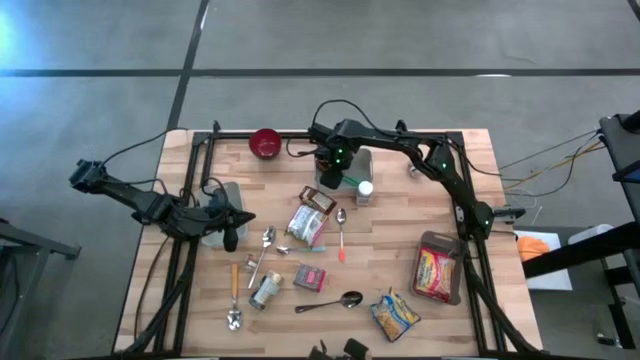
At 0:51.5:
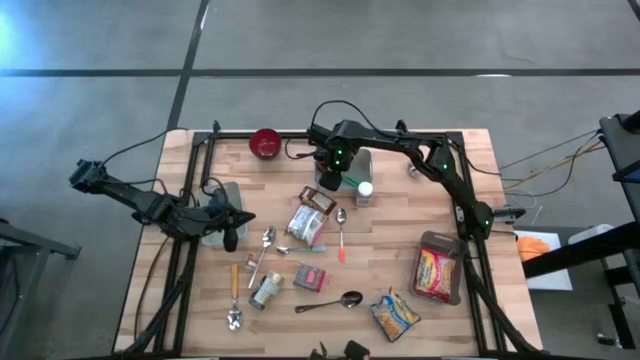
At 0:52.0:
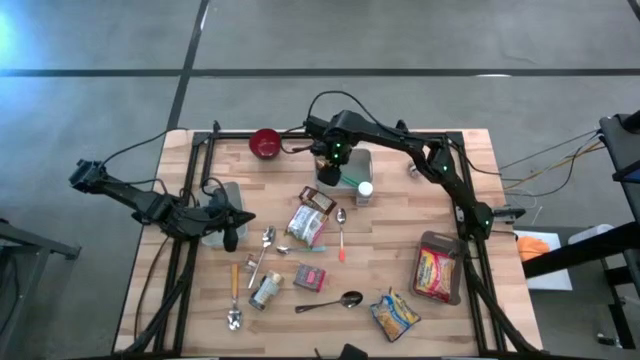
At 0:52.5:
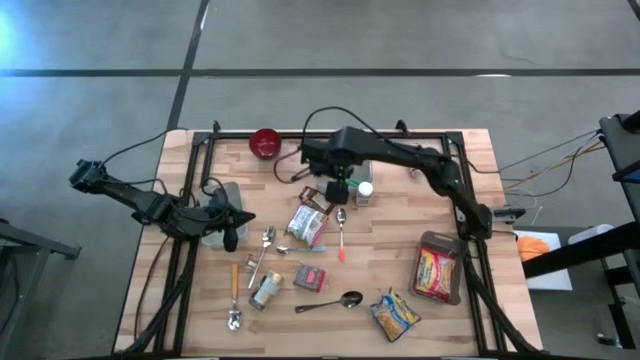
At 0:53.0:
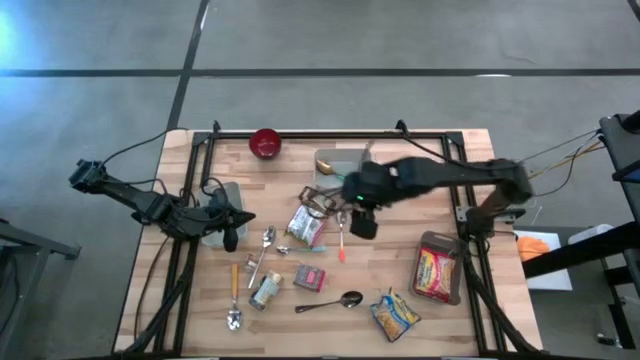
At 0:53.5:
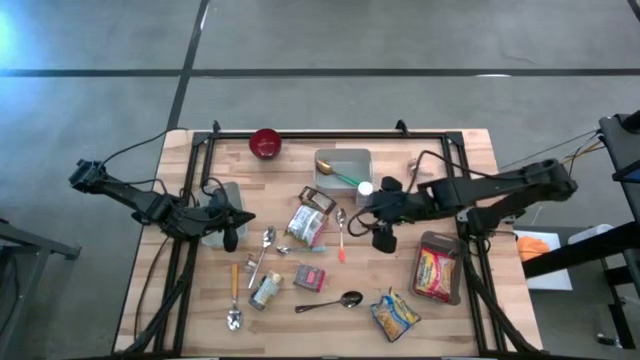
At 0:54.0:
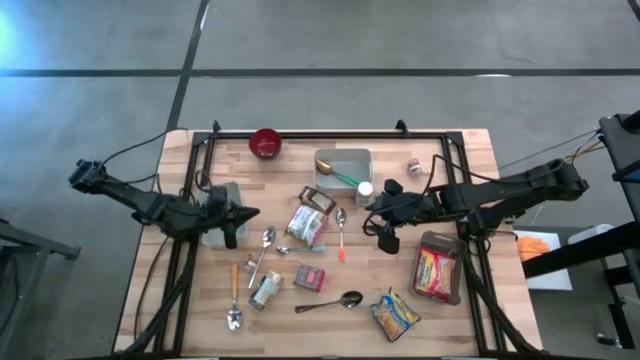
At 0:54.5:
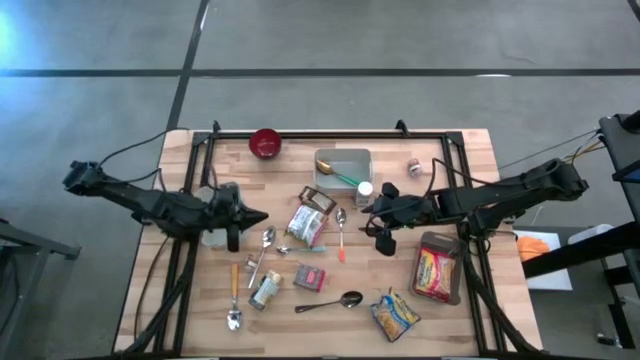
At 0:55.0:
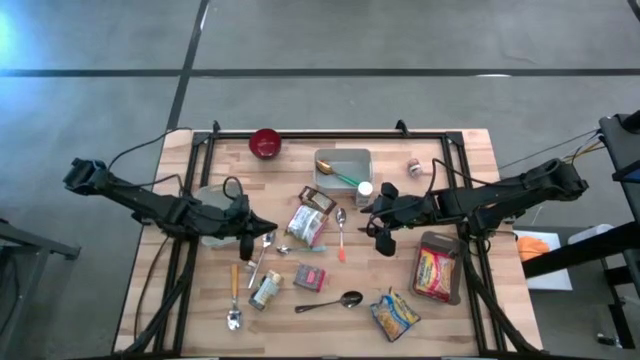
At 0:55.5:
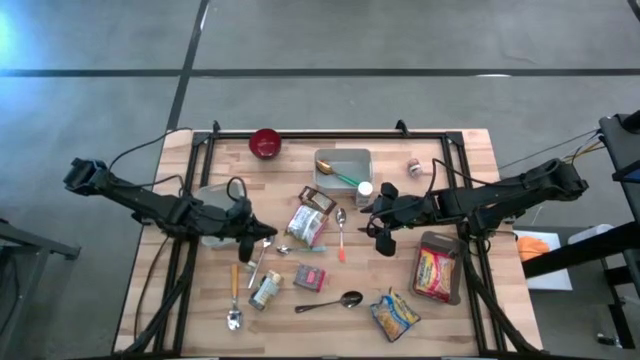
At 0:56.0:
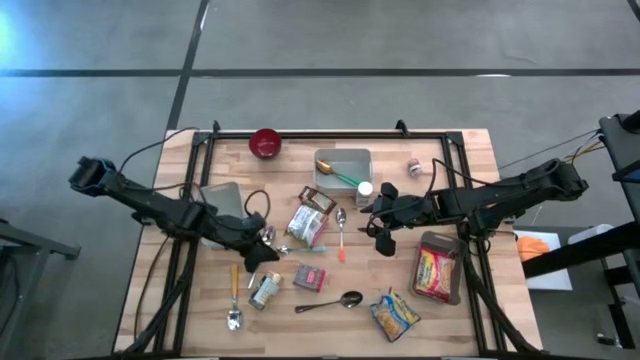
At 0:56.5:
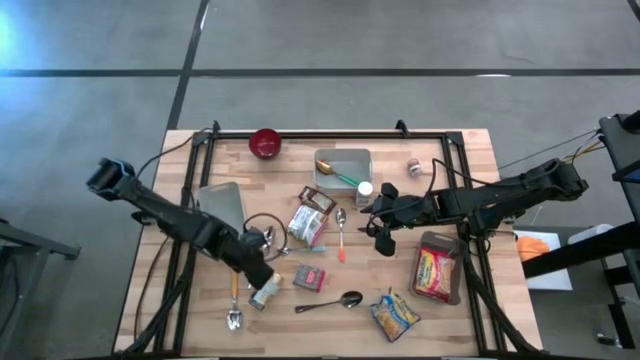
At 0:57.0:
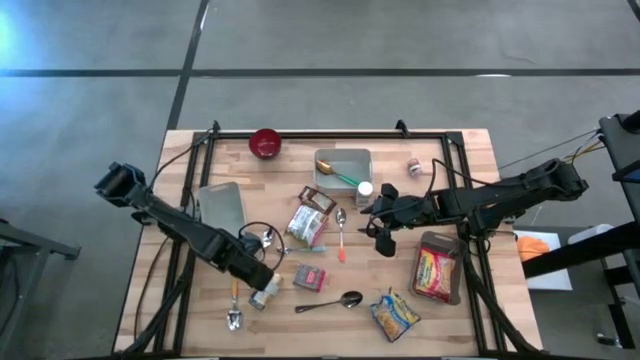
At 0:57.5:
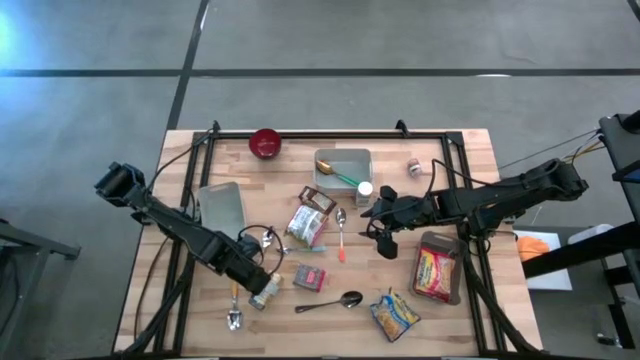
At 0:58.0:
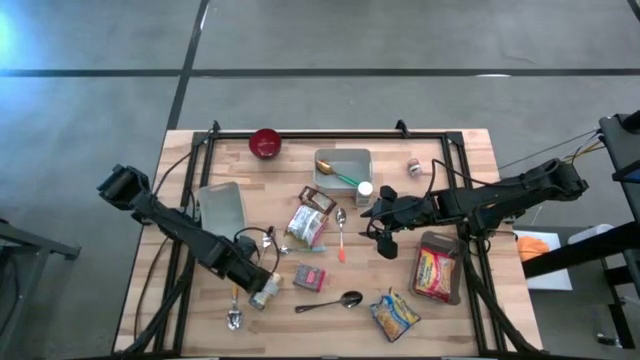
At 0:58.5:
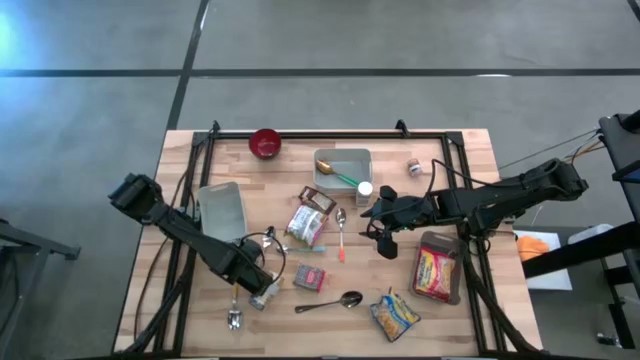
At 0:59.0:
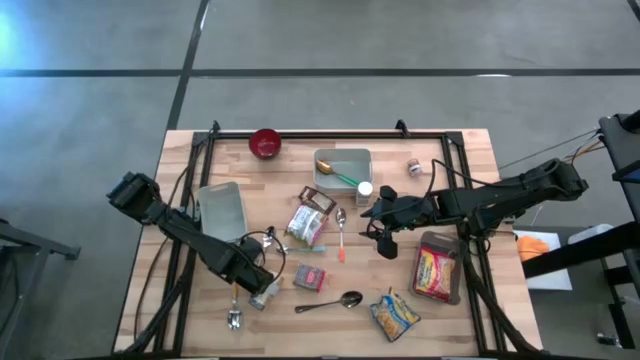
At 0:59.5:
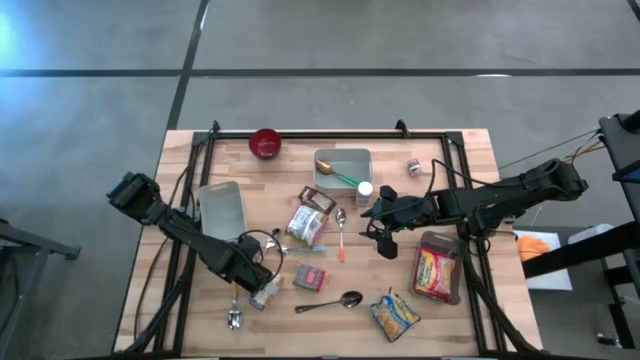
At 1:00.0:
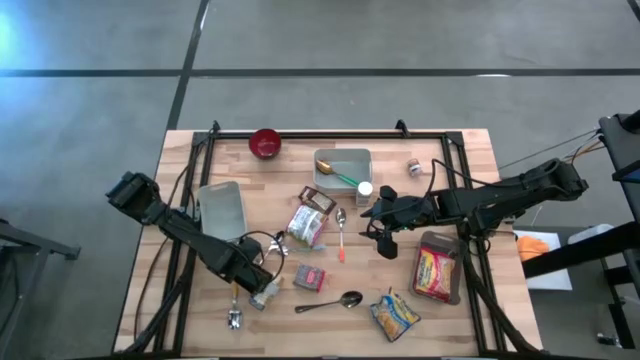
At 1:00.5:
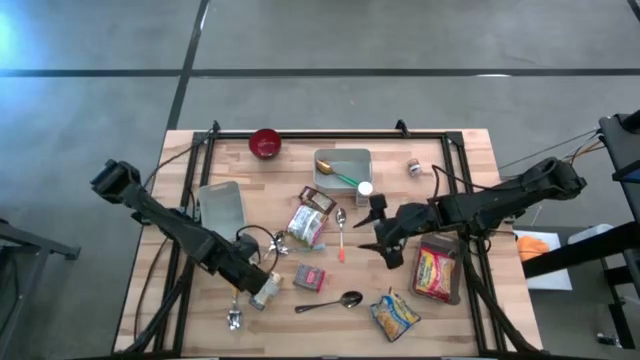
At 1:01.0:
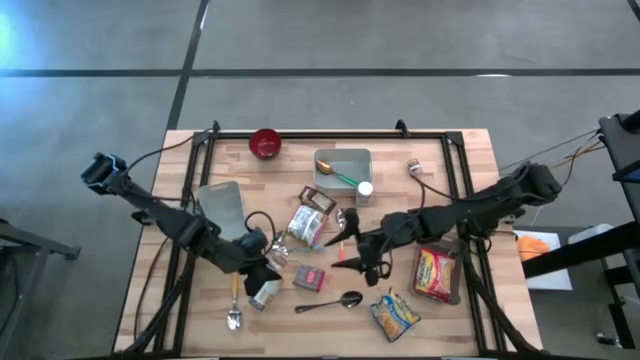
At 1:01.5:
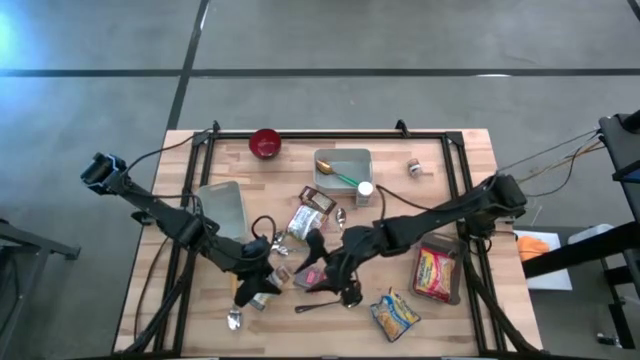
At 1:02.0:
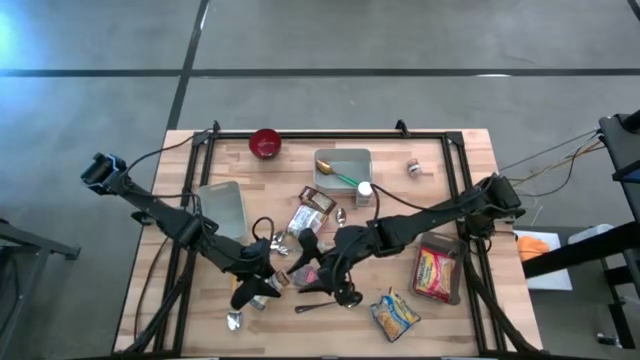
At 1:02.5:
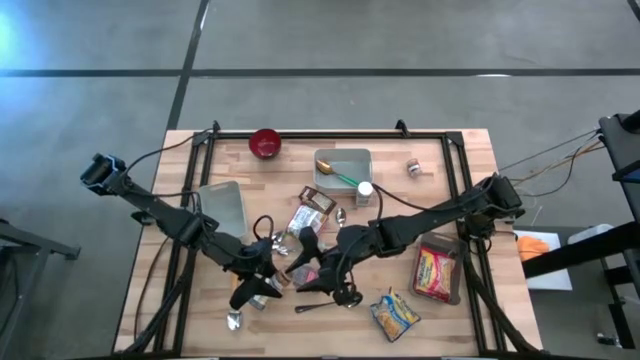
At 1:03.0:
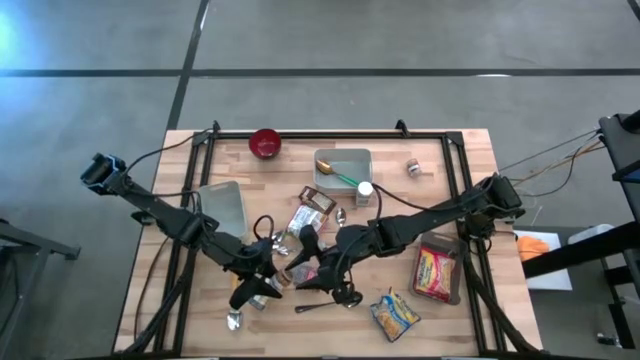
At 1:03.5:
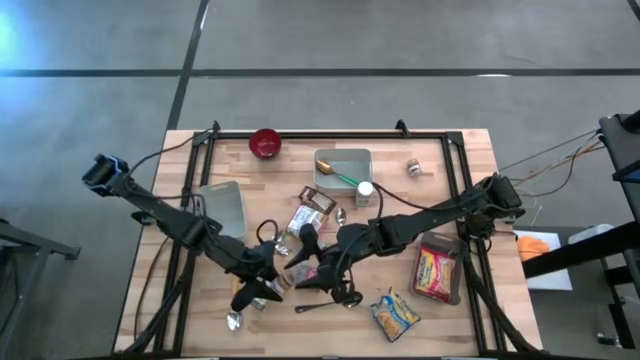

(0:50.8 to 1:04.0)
Put the left brown seasoning bottle into the left gray bin

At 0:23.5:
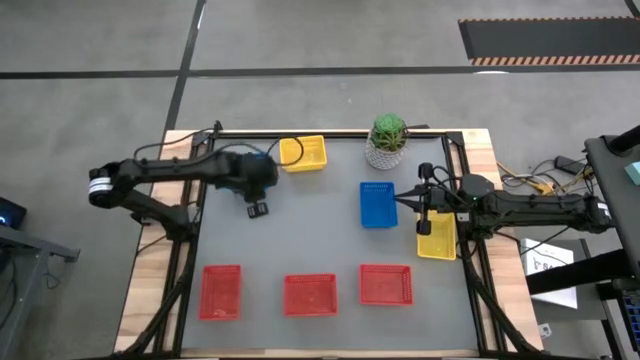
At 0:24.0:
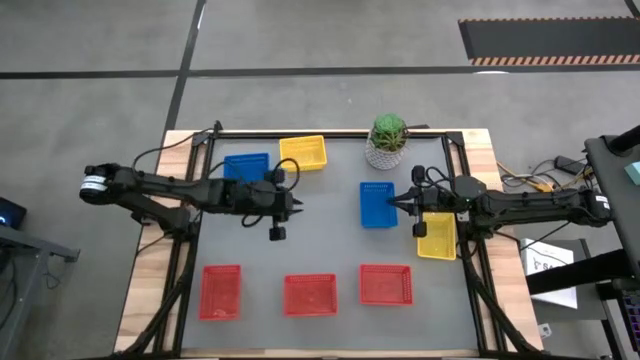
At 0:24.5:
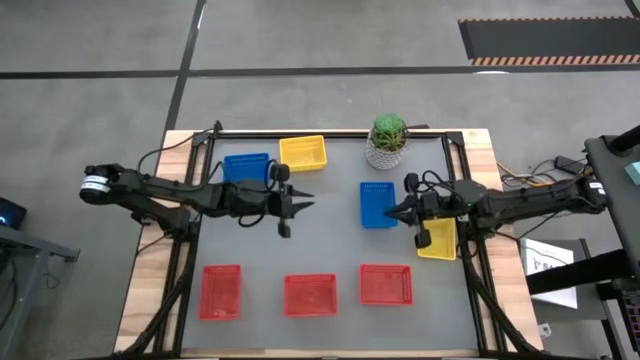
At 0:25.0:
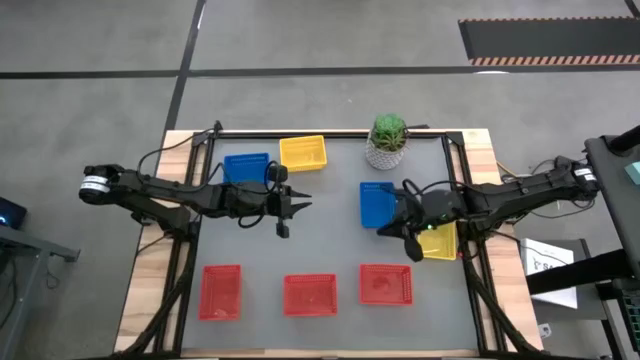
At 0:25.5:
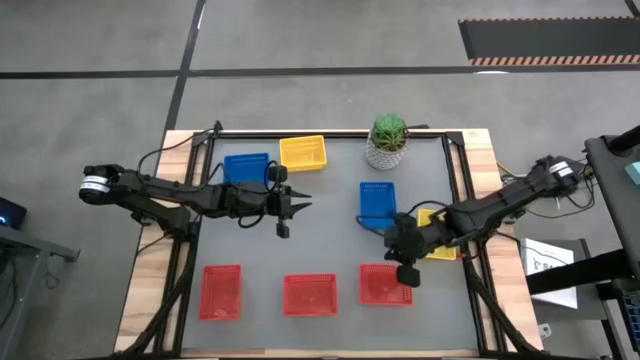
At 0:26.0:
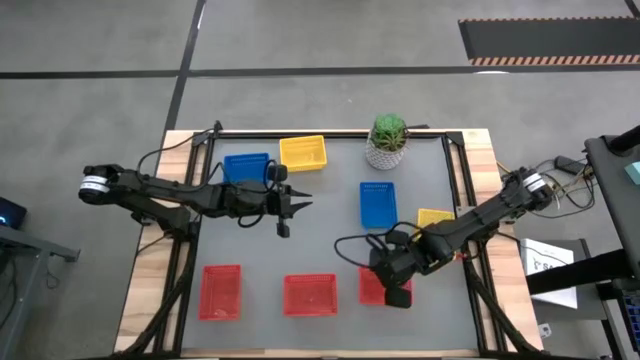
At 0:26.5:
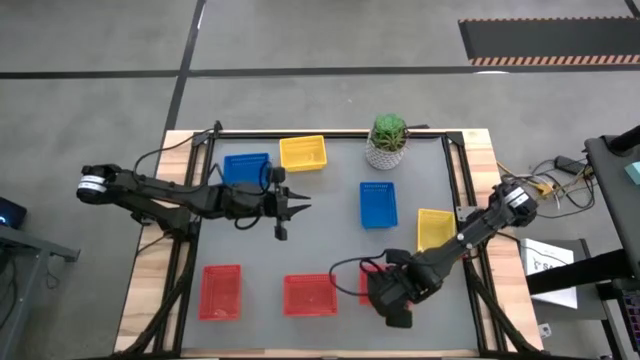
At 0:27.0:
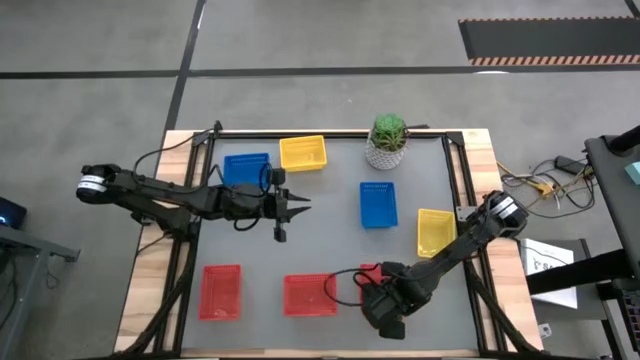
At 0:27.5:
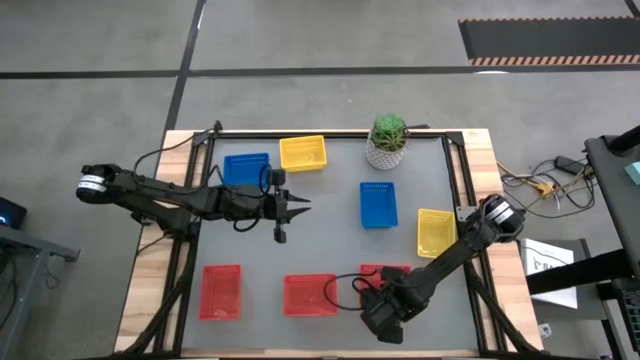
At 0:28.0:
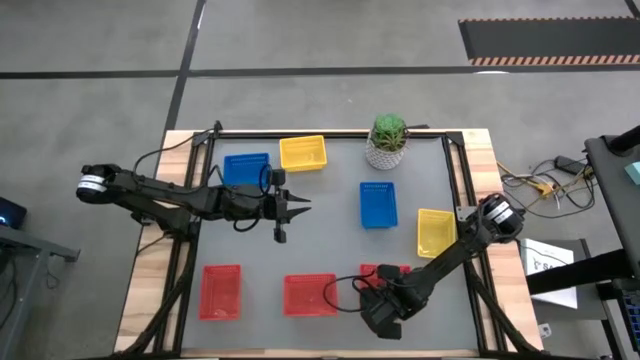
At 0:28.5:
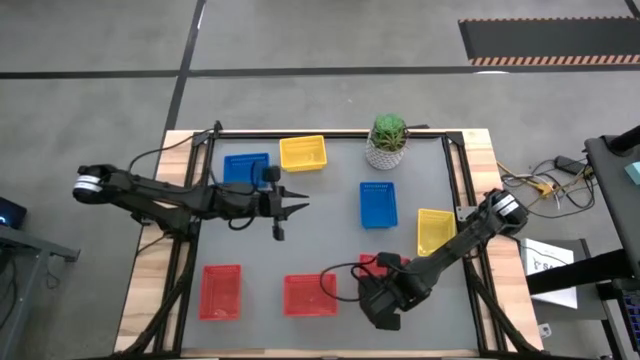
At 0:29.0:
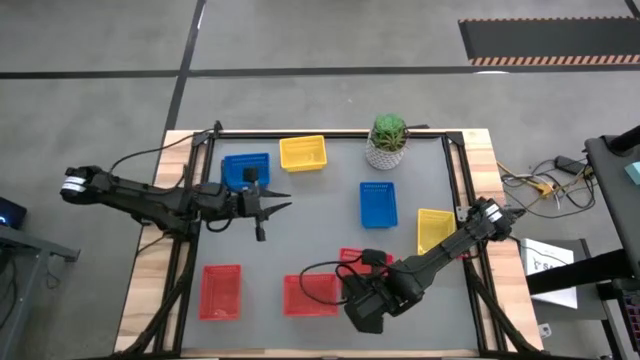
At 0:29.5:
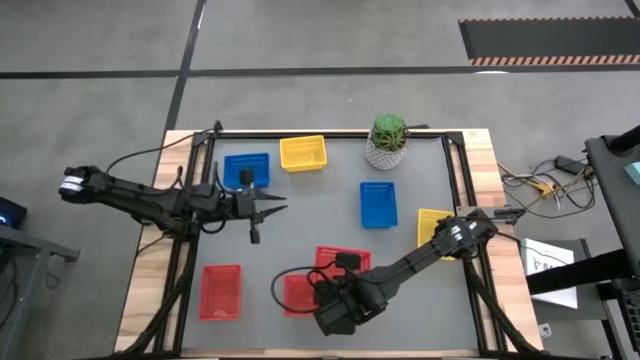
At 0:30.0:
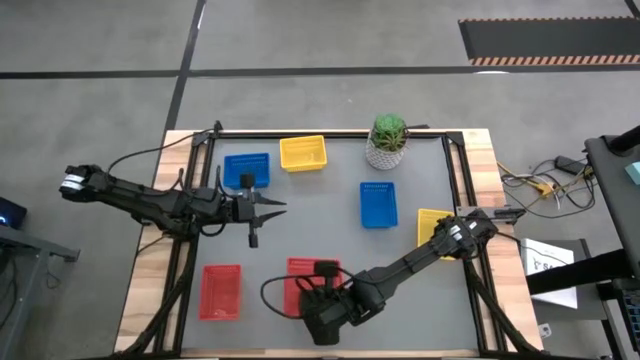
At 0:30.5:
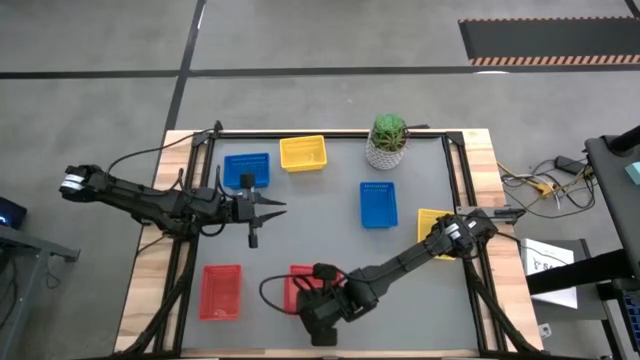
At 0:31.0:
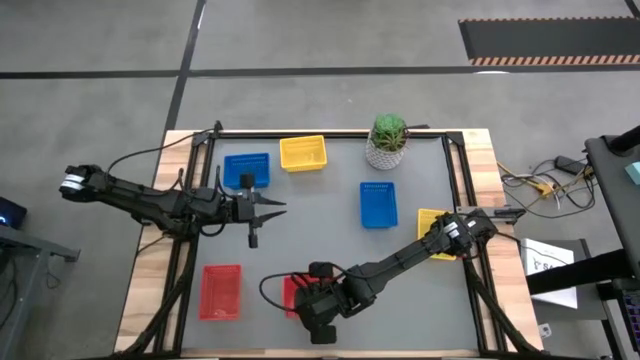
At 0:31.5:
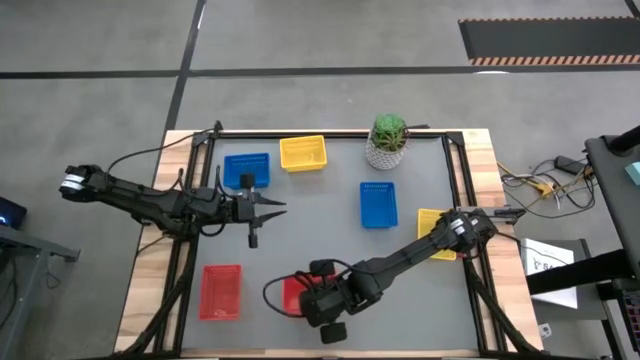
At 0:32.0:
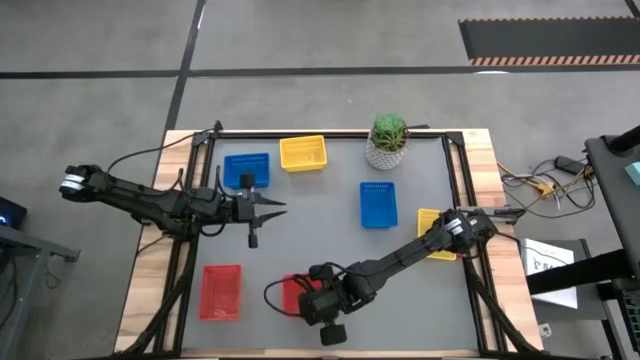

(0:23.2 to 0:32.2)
Stack the right red basket on top of the middle red basket
